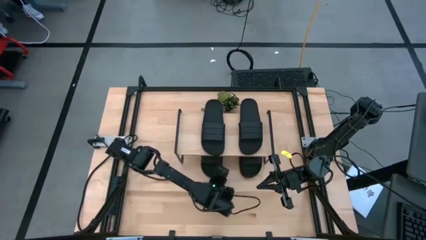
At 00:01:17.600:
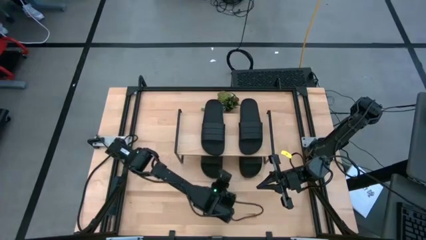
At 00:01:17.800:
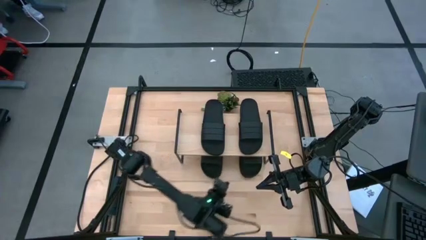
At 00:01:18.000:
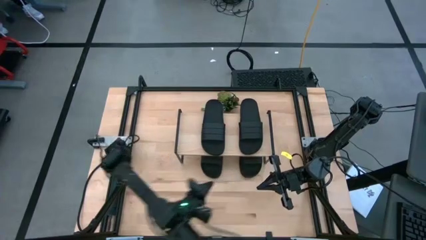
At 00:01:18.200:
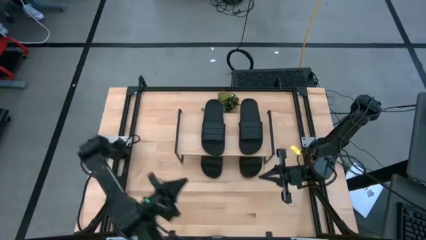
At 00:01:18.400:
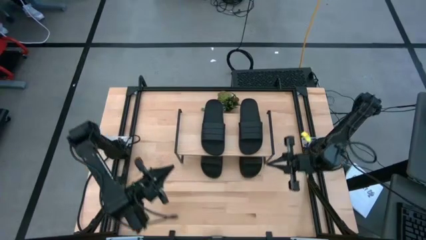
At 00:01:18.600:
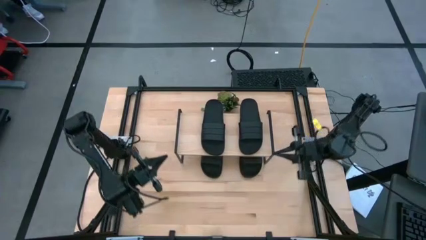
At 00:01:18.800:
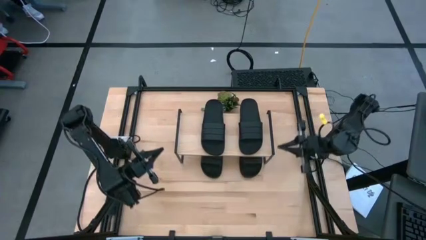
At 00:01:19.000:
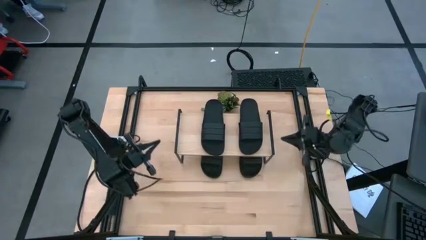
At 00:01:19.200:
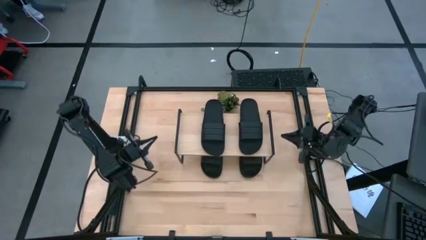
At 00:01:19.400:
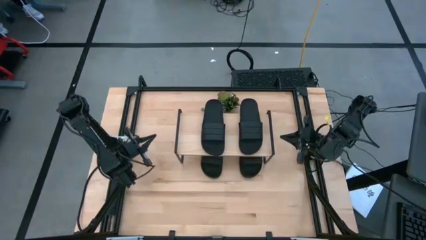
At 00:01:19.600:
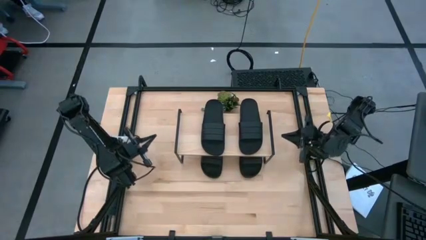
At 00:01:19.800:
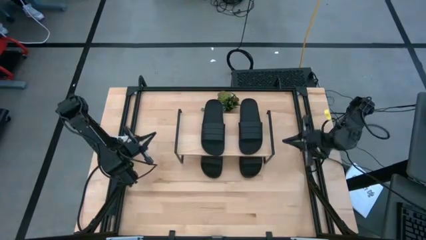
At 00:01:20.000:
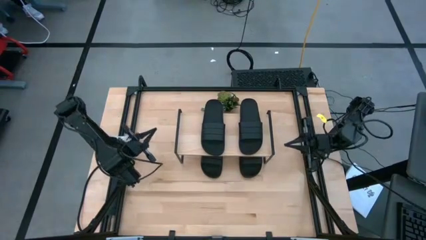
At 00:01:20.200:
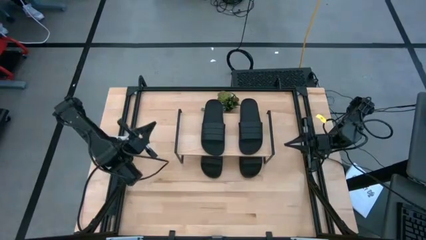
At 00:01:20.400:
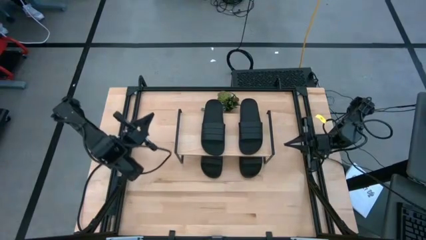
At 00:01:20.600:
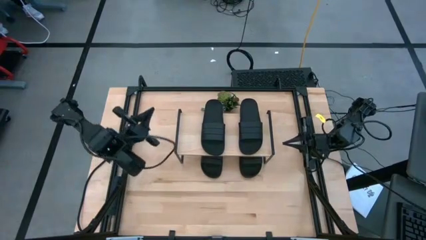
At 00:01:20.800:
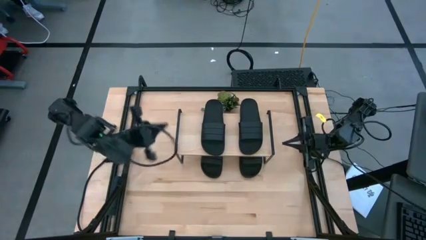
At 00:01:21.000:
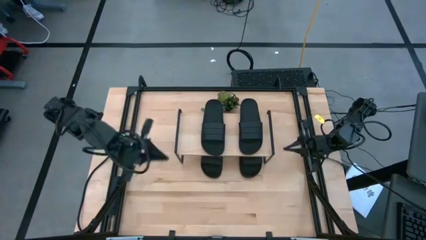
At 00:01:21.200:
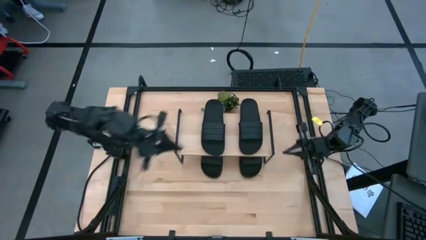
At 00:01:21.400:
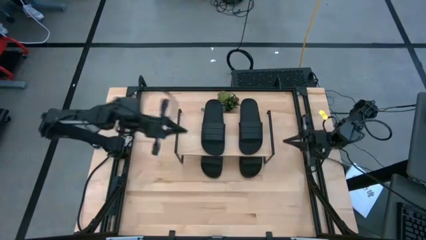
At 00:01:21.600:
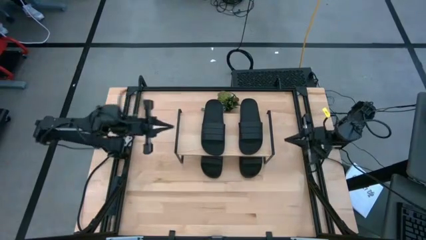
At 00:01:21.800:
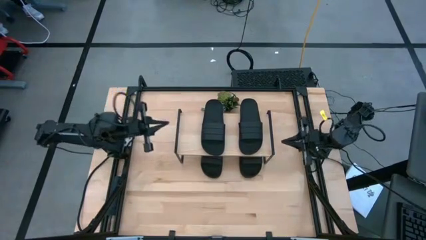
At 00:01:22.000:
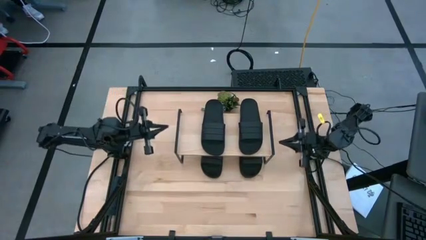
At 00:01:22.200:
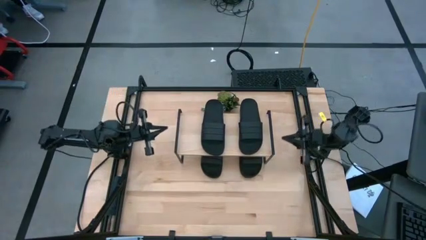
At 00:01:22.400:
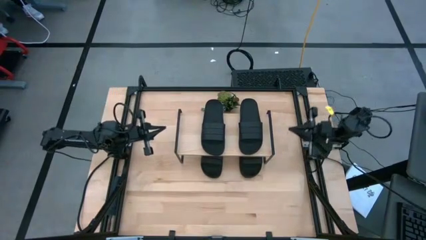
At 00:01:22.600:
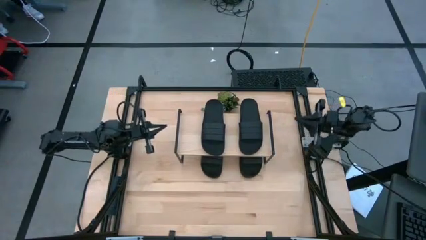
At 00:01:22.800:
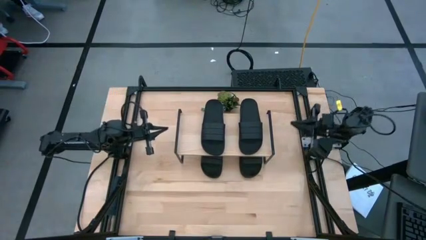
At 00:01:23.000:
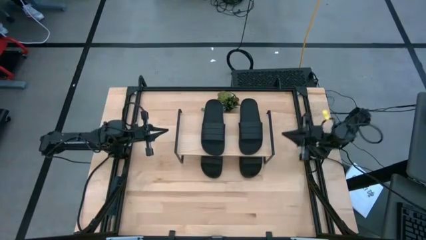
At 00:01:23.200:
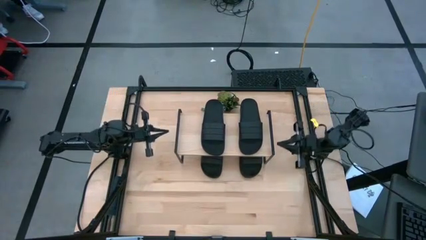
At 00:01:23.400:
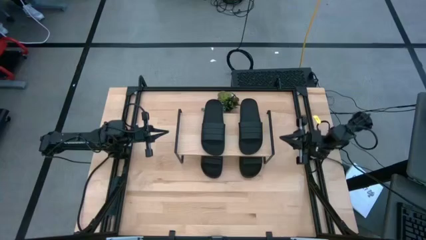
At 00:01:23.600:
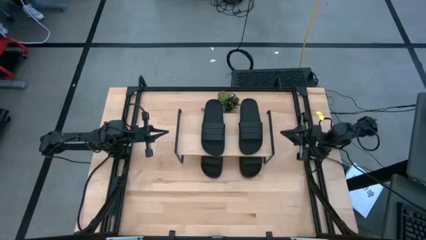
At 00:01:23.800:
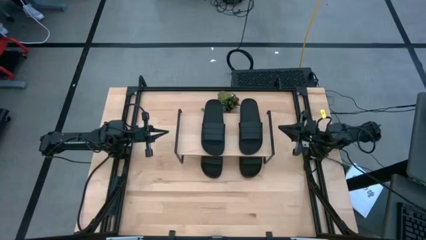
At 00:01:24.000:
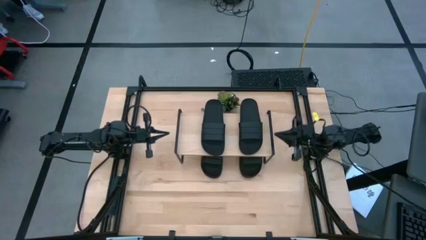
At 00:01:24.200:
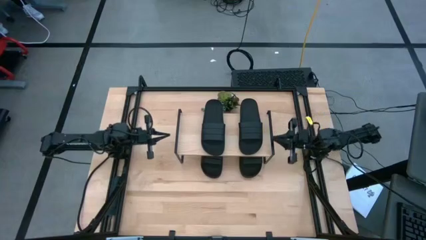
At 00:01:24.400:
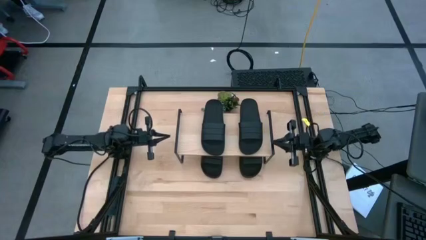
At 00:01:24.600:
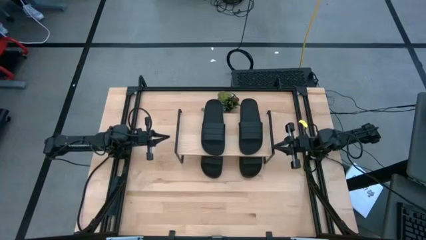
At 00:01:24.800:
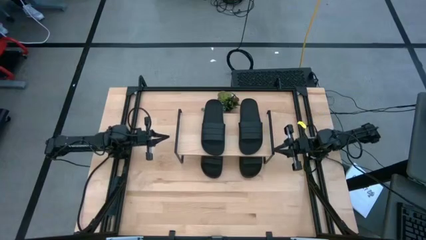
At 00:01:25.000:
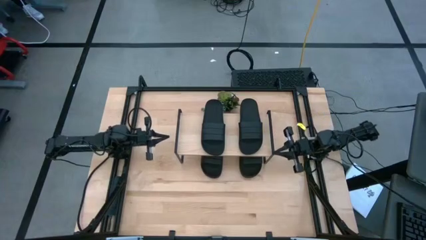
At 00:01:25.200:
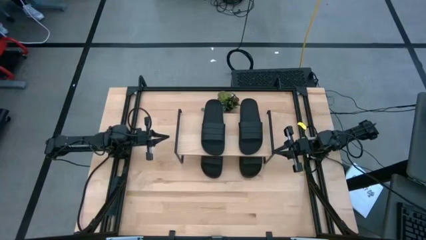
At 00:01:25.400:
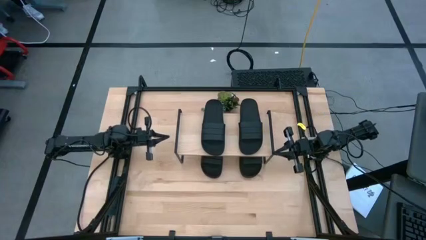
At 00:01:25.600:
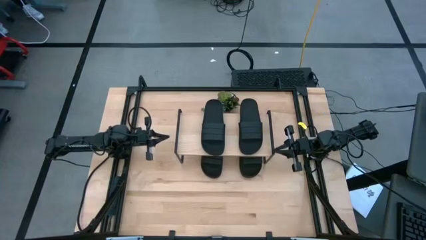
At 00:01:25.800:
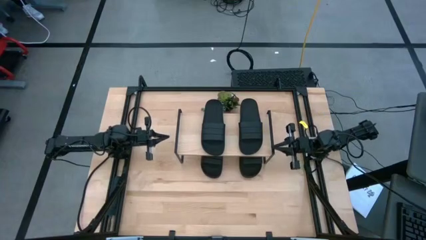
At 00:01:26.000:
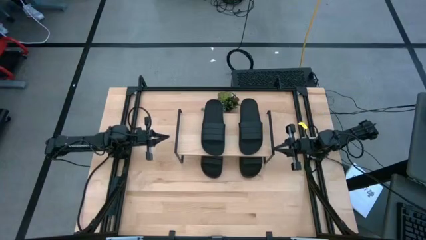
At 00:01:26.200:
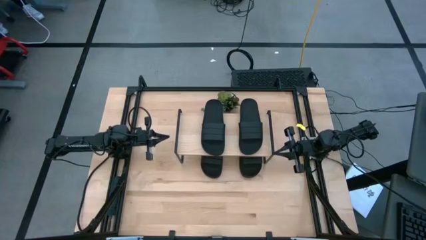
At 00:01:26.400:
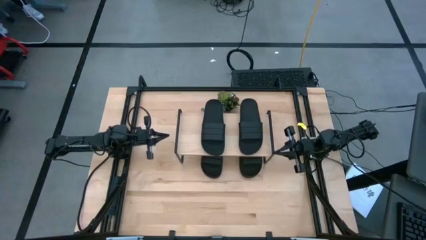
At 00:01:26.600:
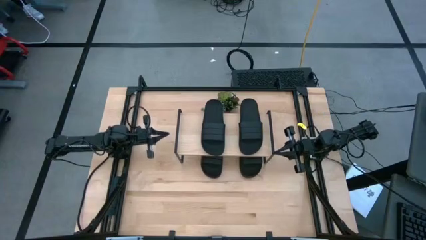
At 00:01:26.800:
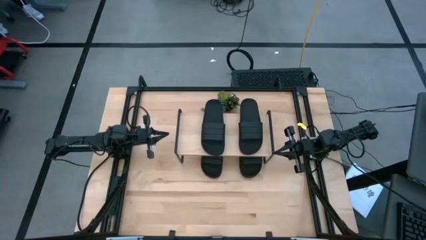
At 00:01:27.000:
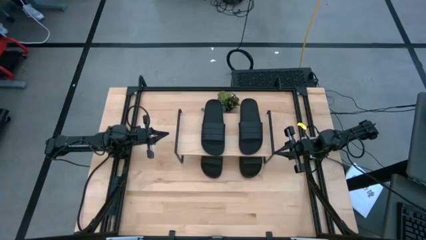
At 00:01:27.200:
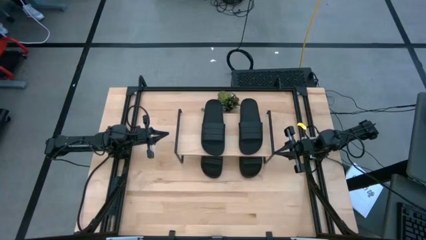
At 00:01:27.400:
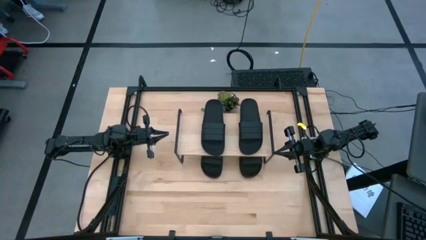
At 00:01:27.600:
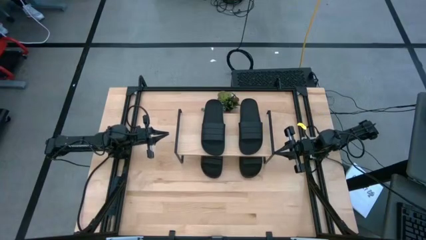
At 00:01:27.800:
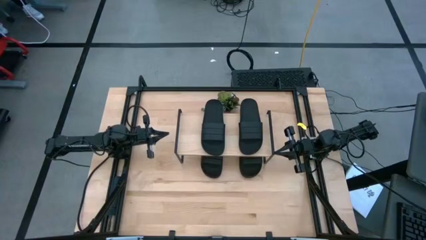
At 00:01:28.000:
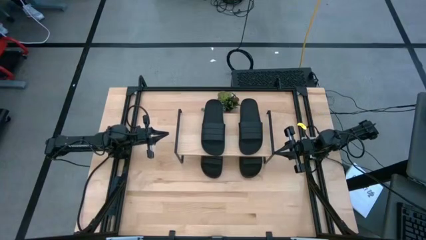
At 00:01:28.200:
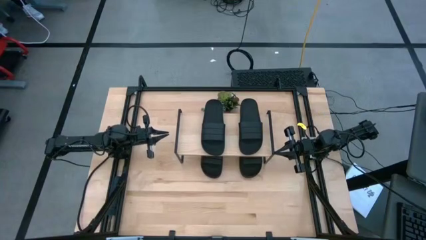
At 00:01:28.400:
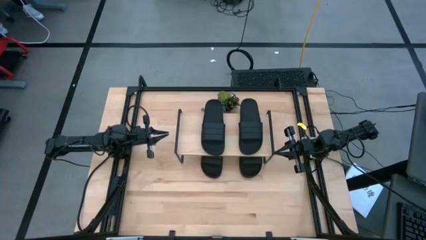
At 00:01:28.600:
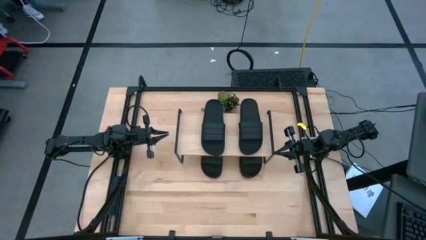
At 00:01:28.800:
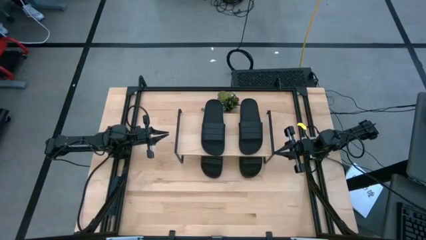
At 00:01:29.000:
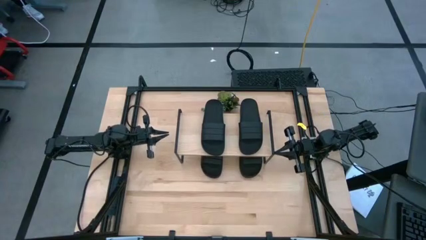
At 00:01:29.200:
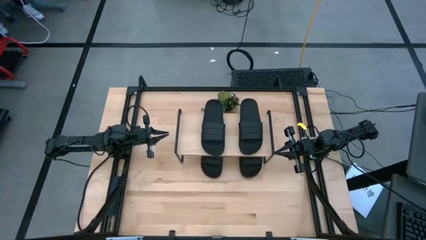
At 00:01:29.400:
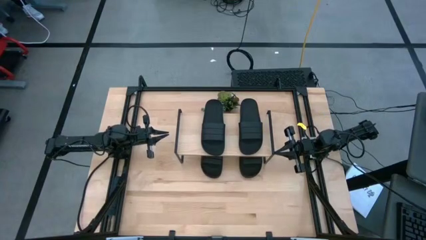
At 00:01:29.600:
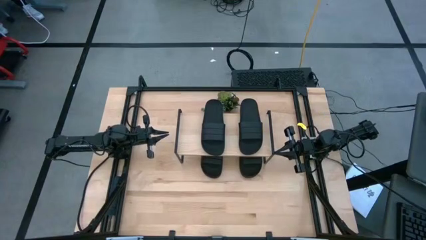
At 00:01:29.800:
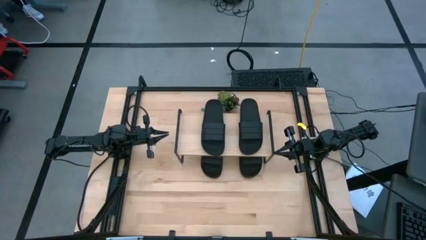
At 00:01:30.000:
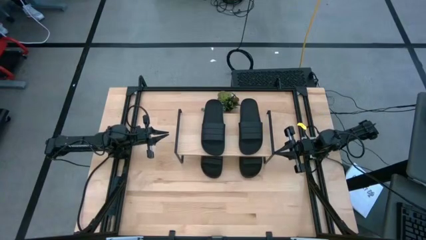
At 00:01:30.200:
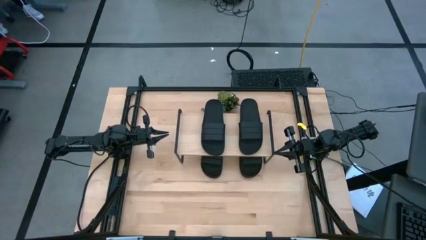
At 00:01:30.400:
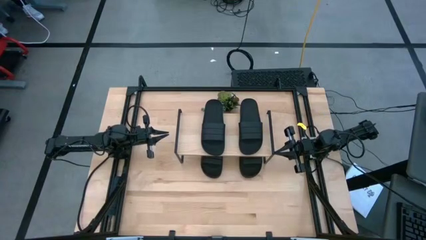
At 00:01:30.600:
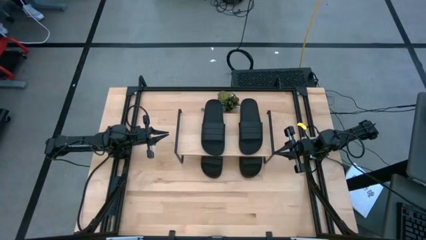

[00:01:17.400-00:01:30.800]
Task: Pick and place slides into the shelf
Return to Home Position
